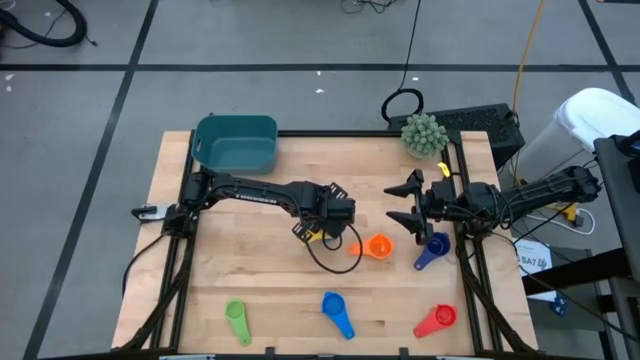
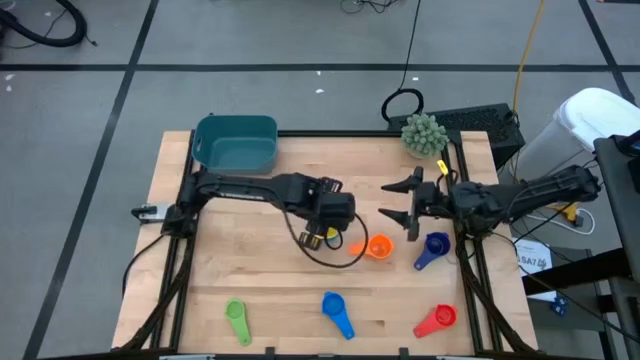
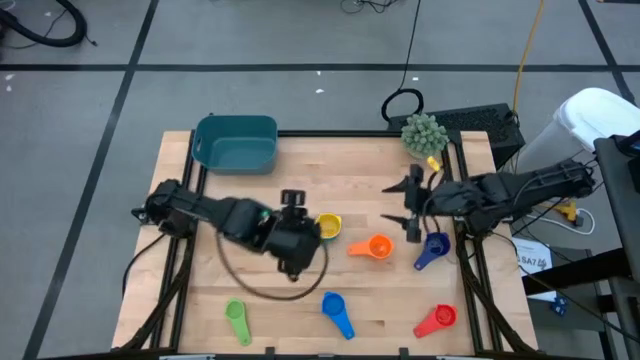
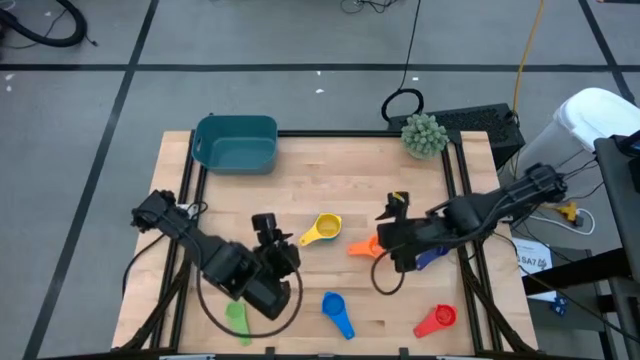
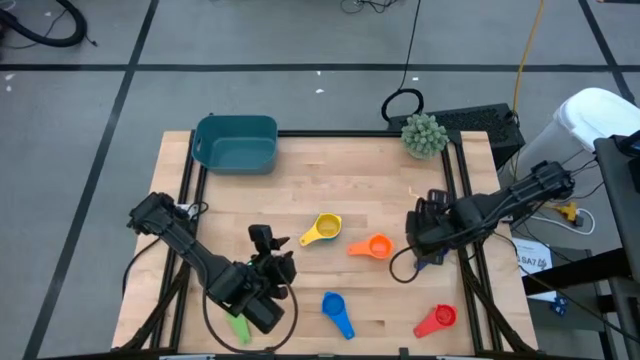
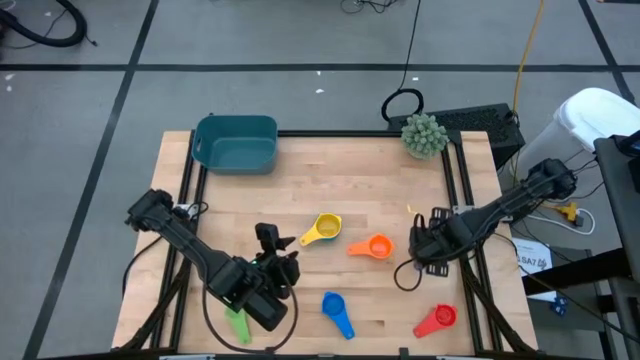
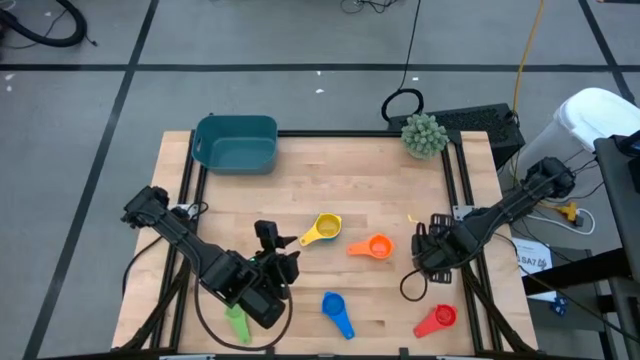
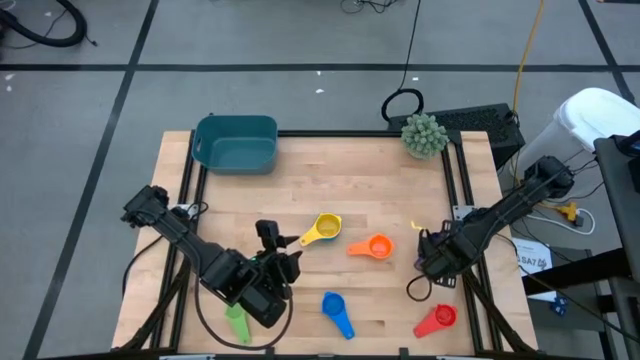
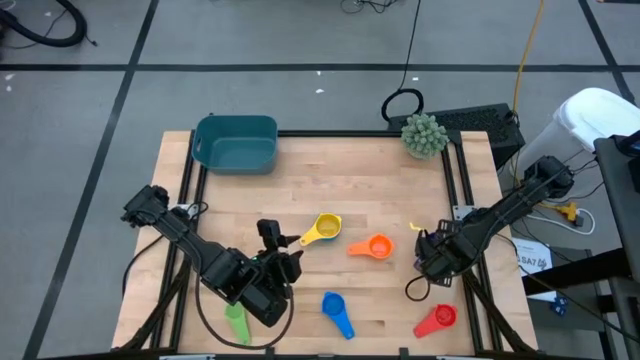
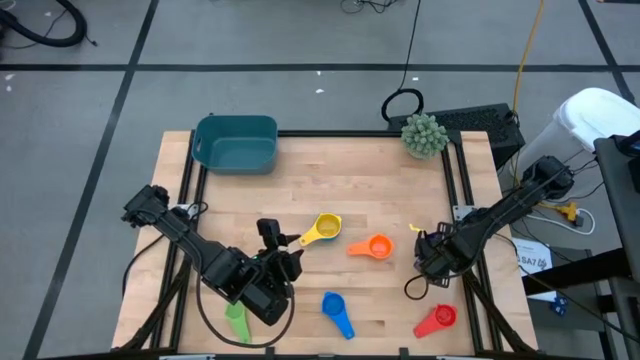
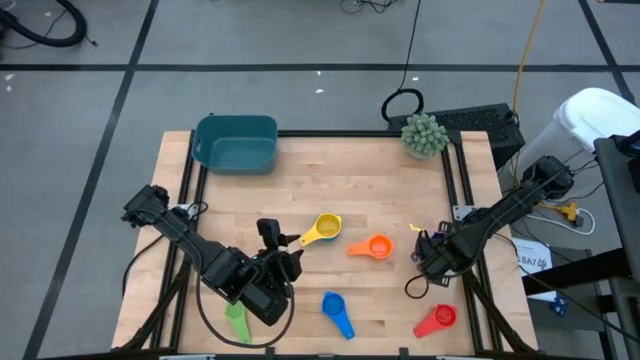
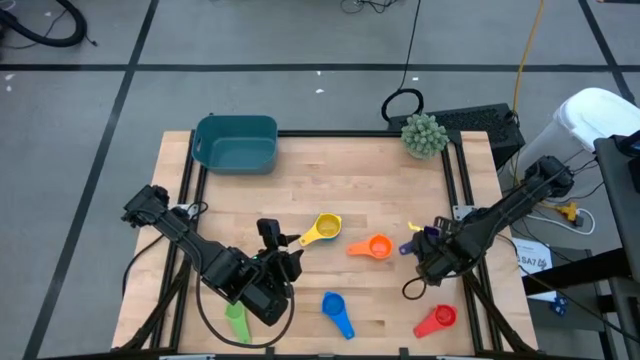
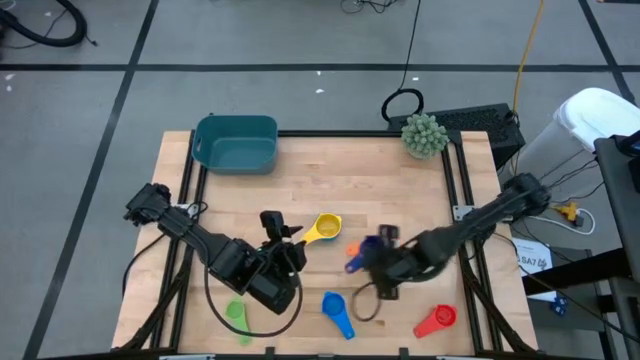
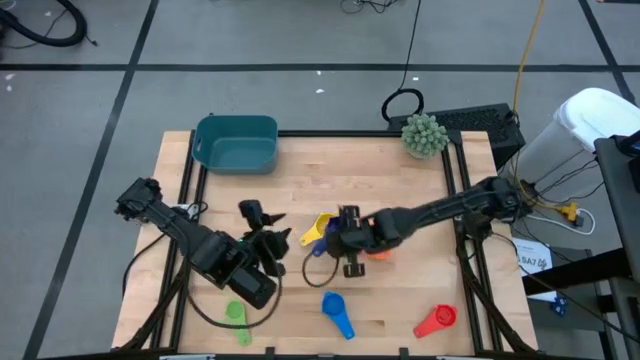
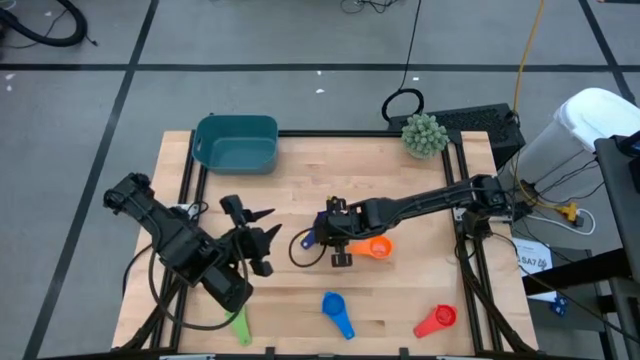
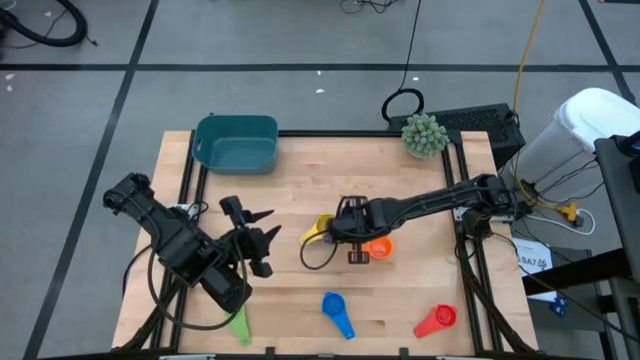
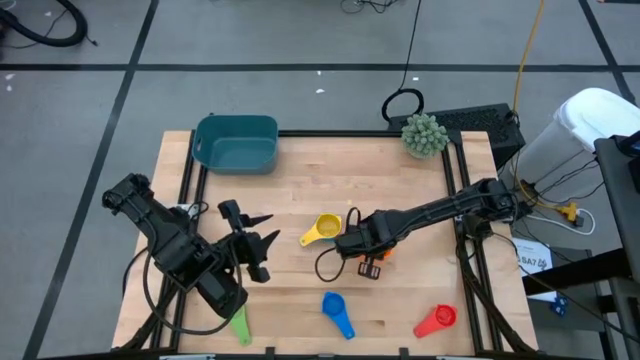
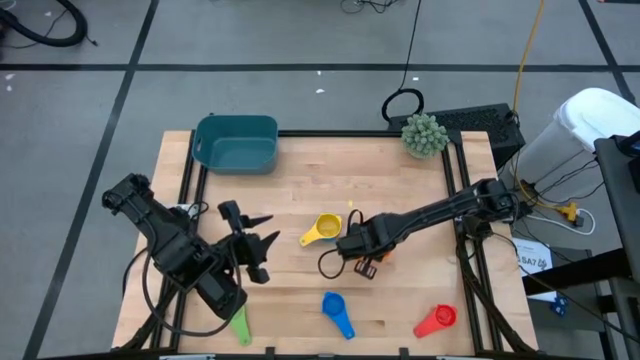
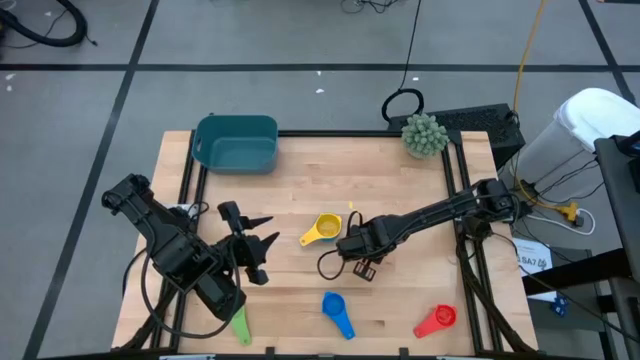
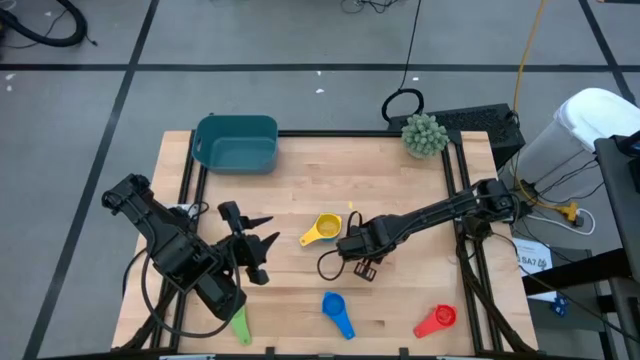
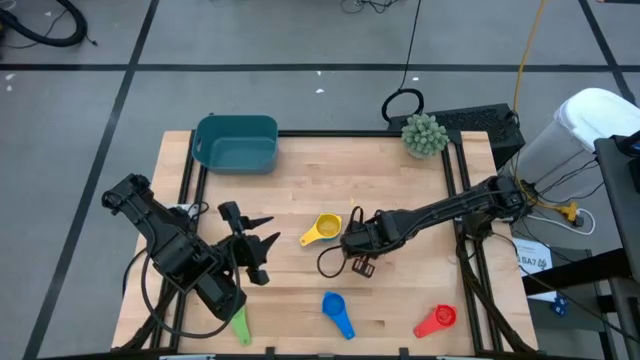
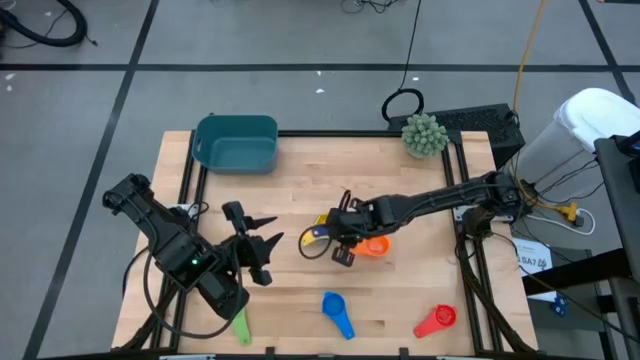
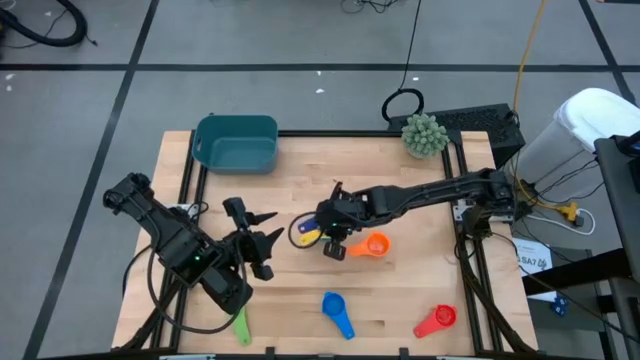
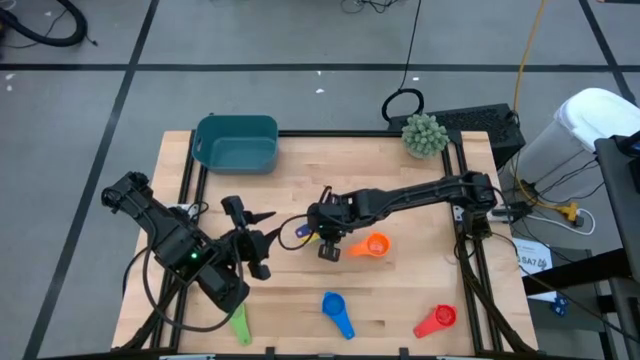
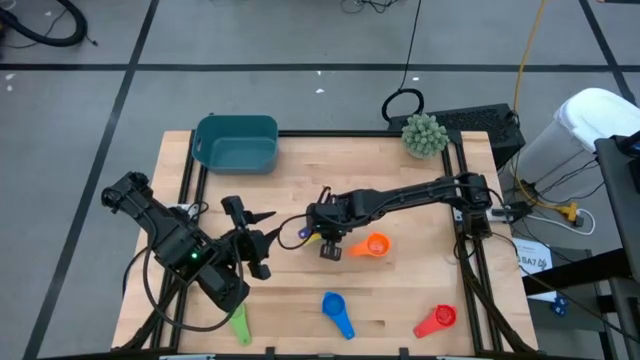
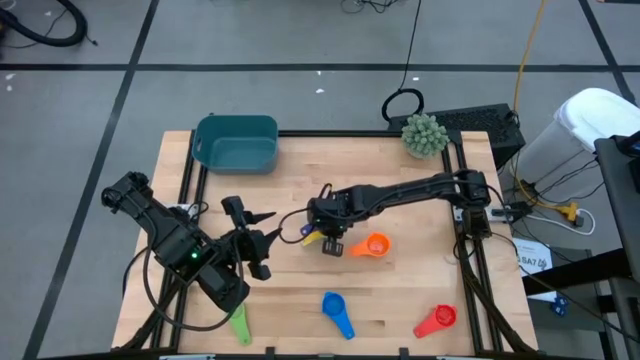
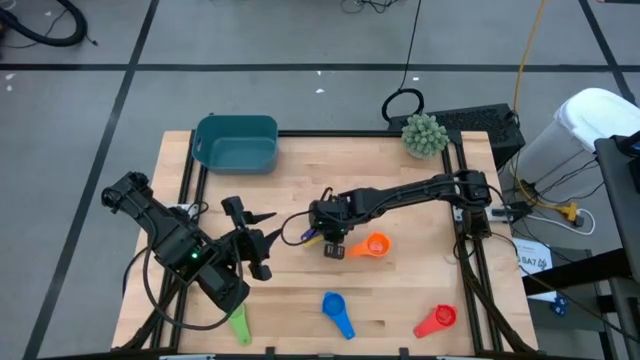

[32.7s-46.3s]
Task: Nest measuring cups in basket
Stack the dark blue measuring cup on top of the yellow measuring cup

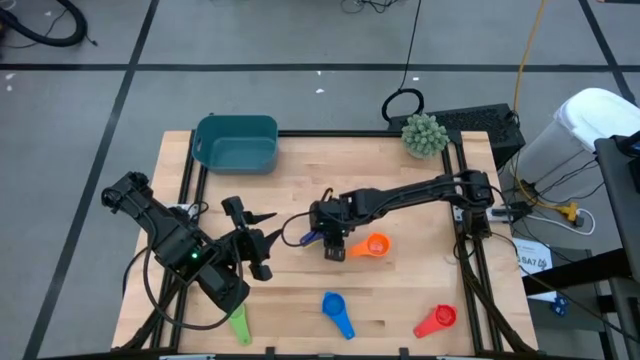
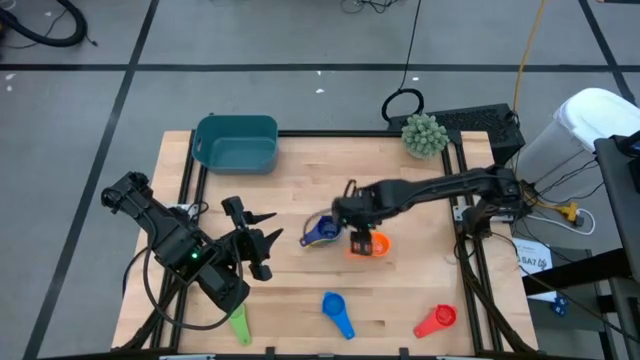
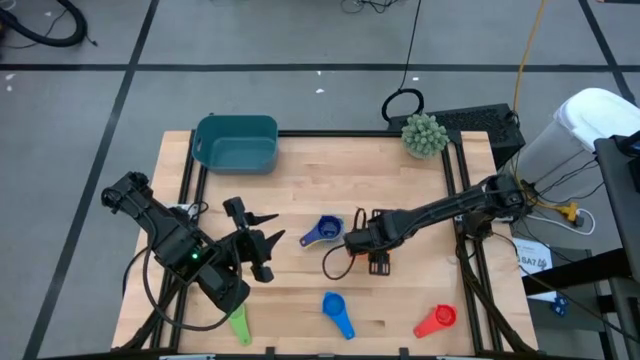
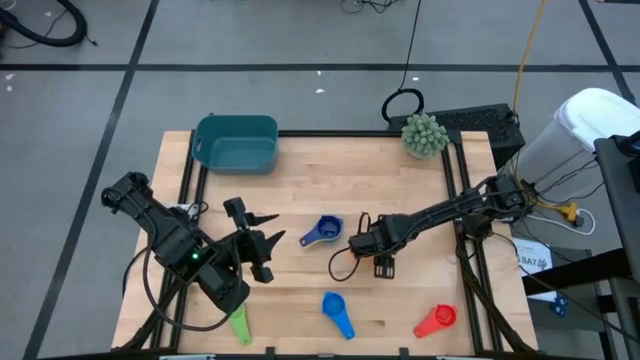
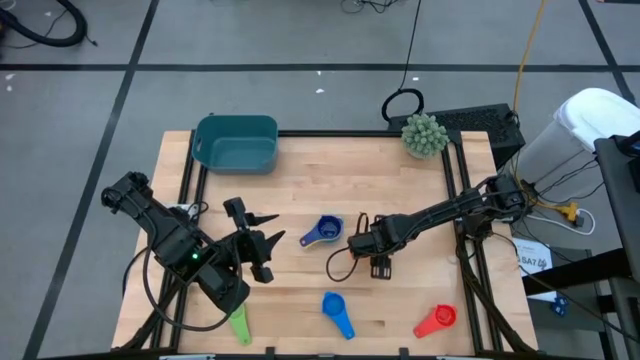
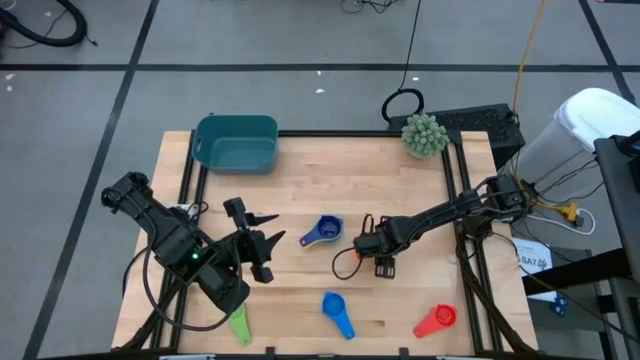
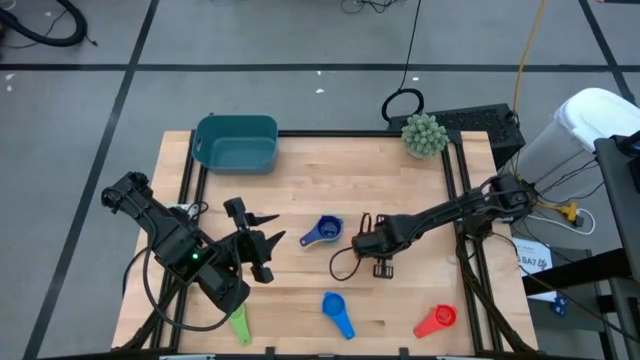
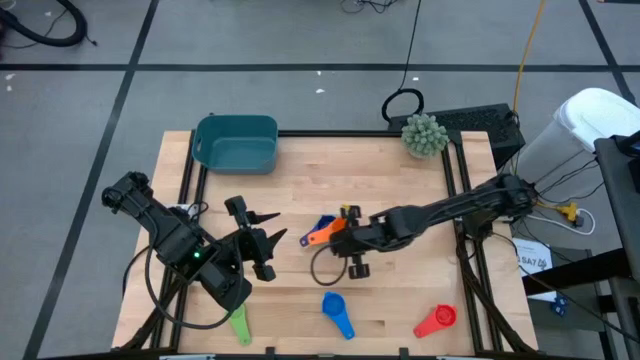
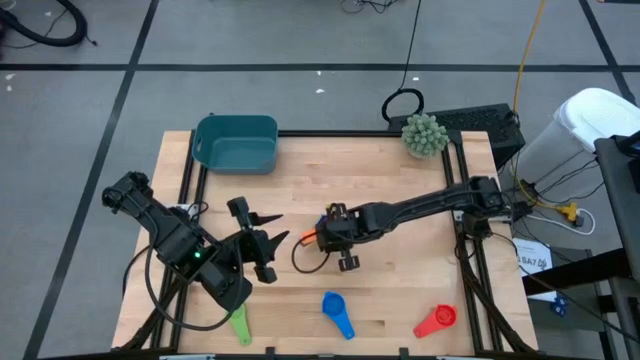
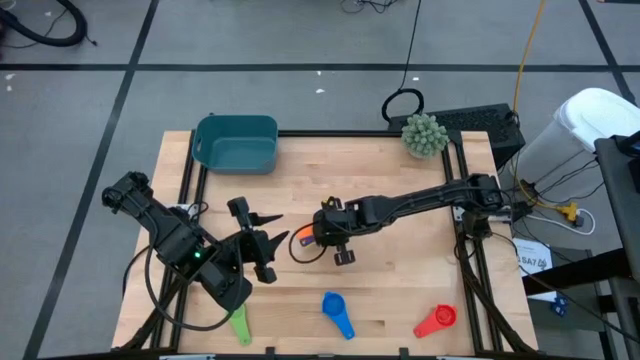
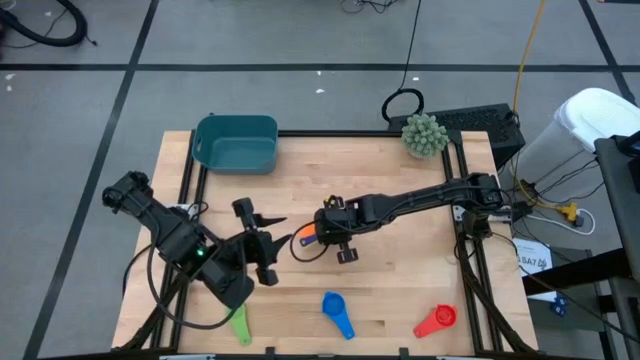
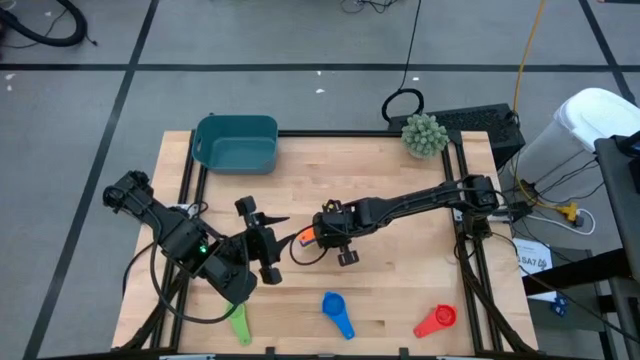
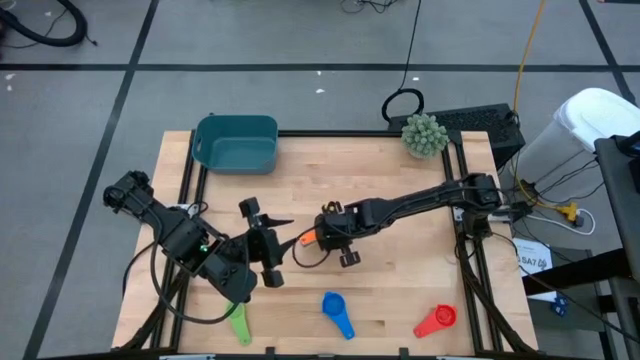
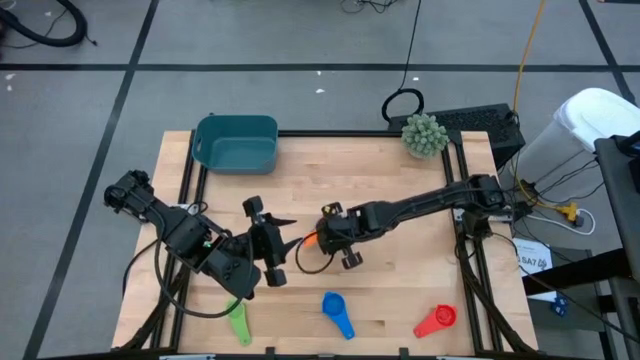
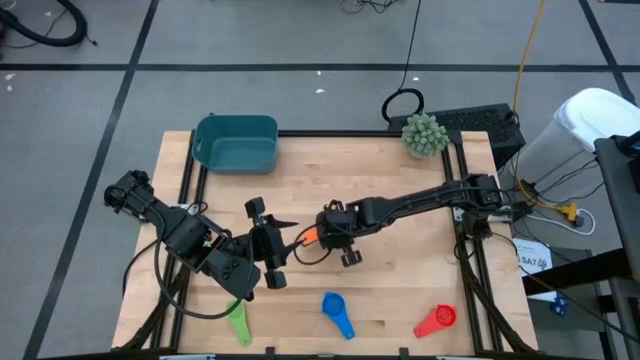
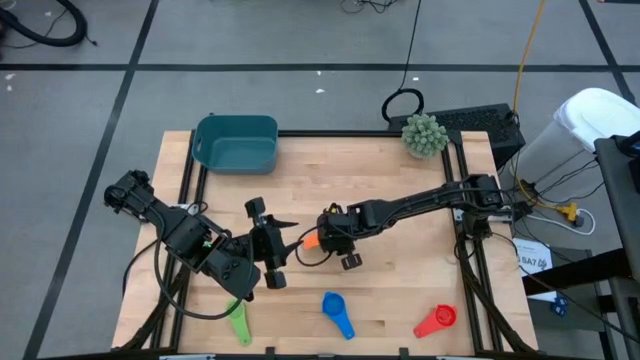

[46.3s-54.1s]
Stack the orange cup on top of the dark blue measuring cup
